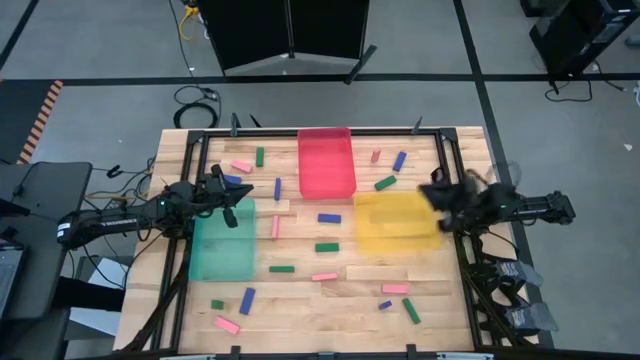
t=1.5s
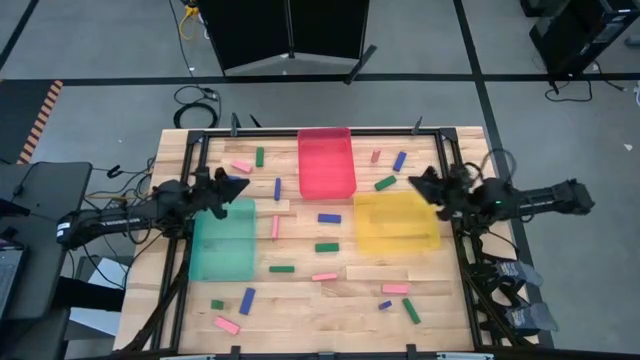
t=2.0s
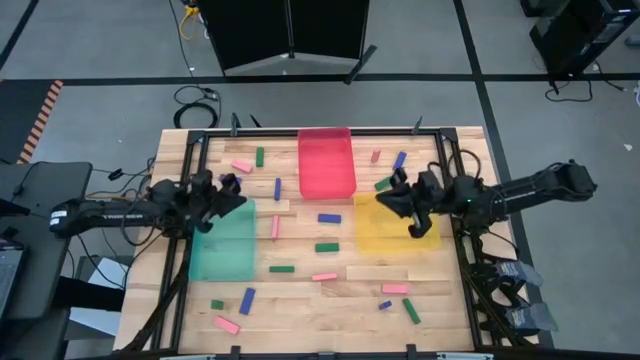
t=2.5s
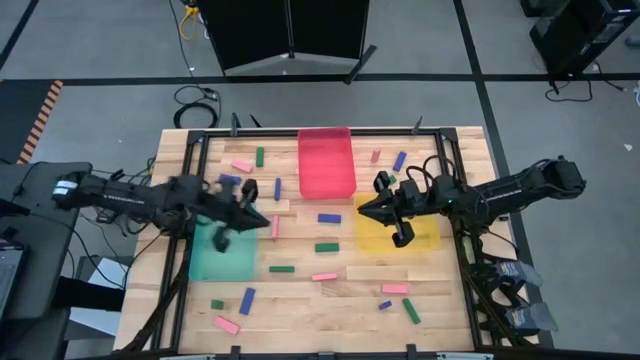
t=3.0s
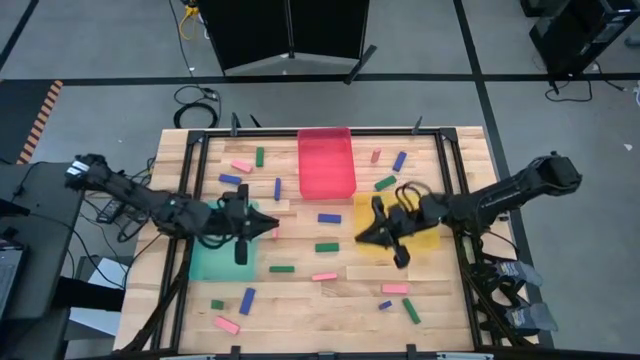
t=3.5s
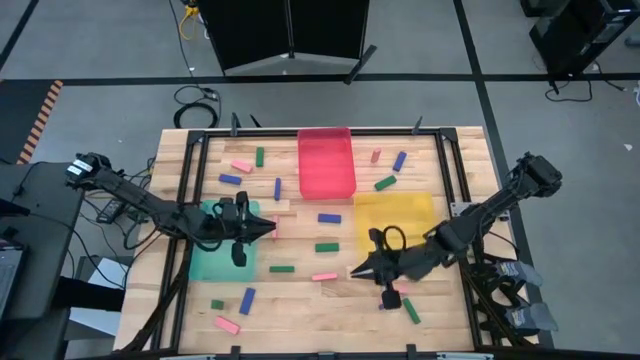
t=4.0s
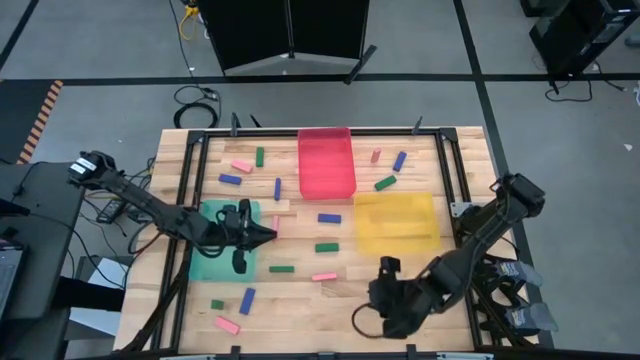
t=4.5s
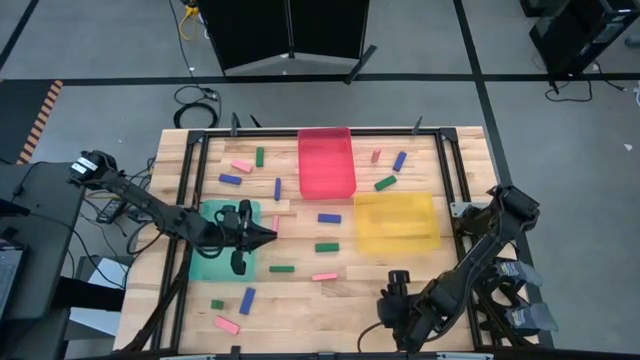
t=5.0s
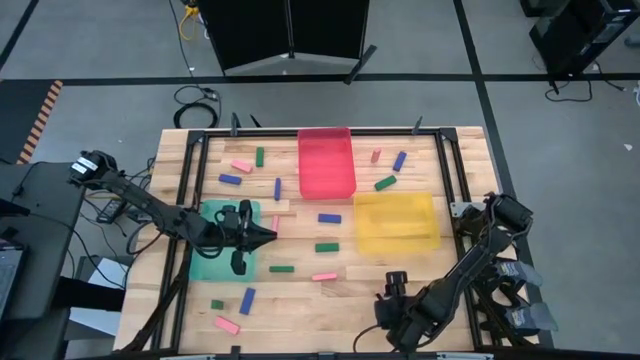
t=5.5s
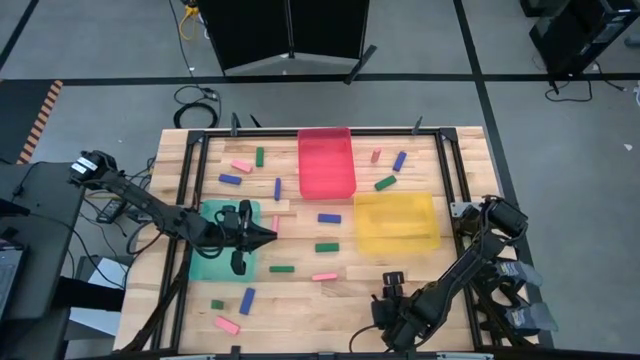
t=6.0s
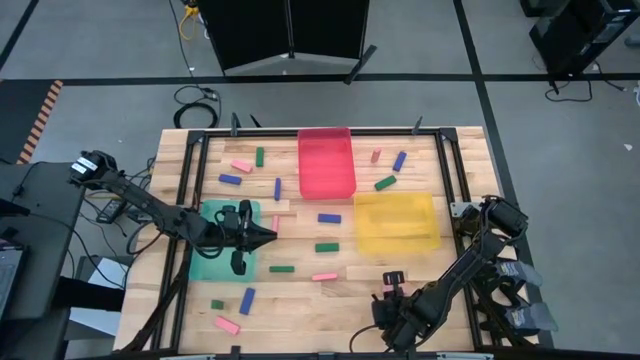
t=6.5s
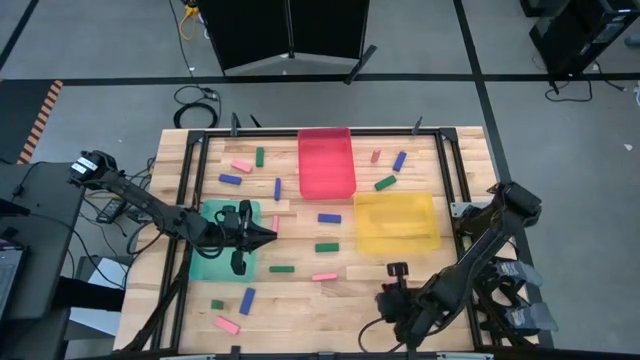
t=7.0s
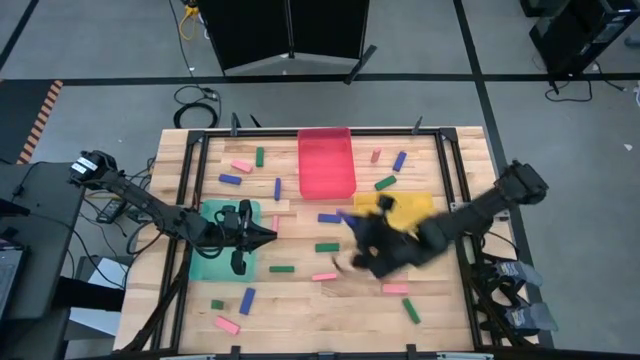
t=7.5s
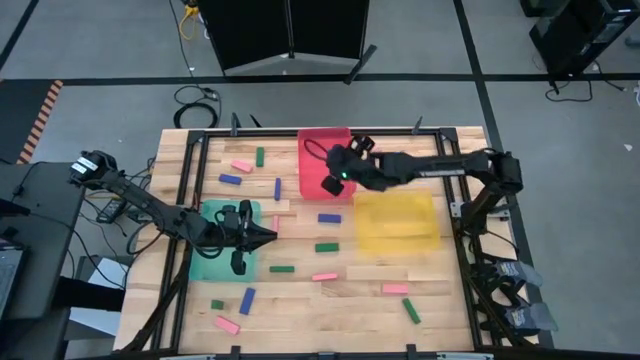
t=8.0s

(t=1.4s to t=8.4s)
Task: Sort blocks
Put the blue block into the red bin

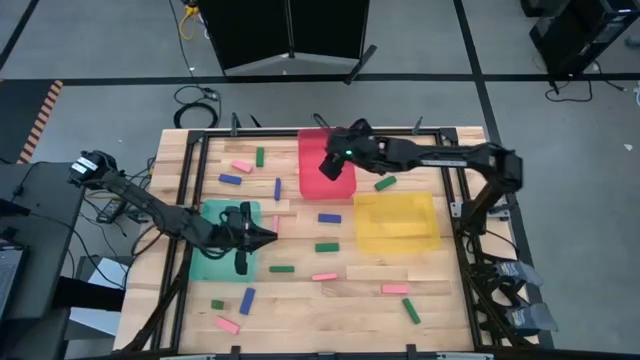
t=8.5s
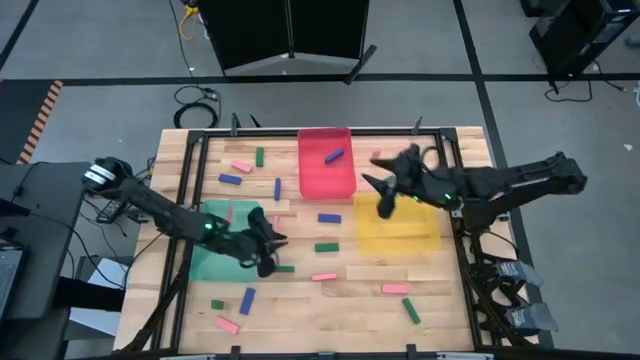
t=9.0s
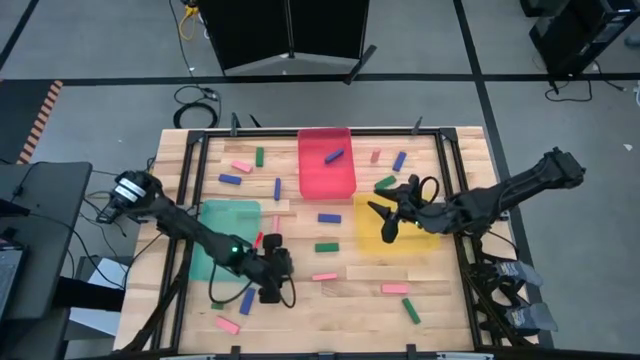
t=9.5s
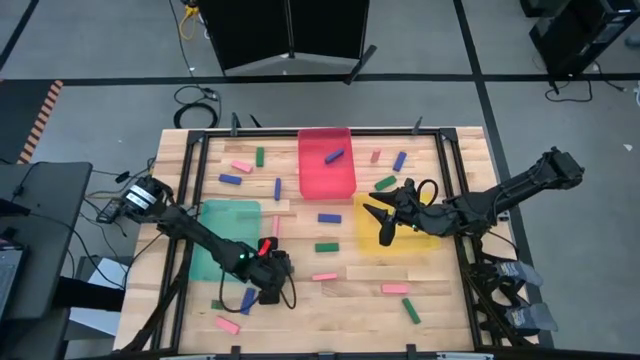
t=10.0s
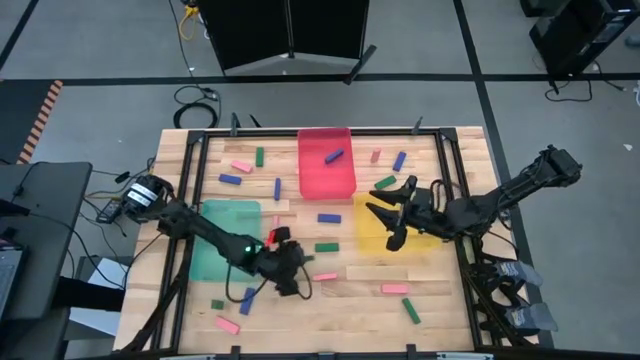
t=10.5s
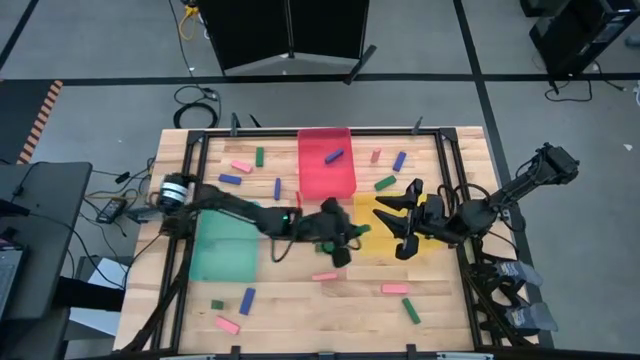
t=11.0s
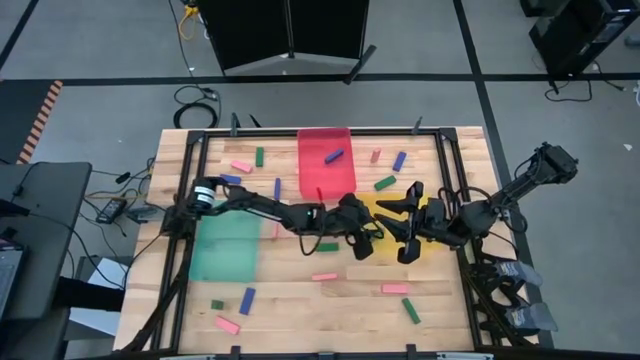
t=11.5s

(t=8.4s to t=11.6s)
Put the green block into the yellow bin

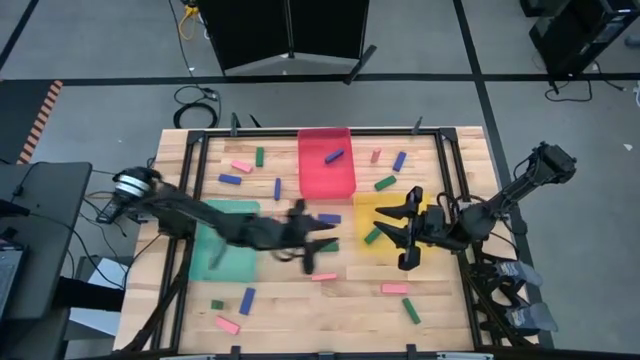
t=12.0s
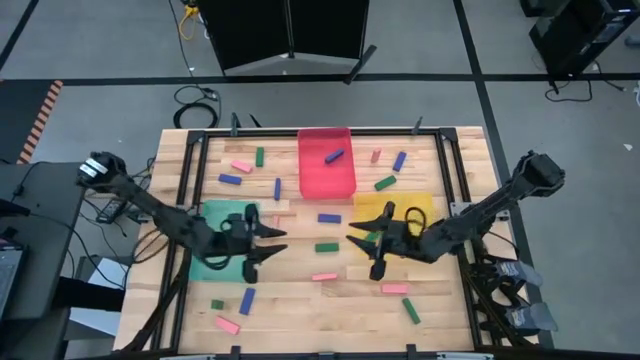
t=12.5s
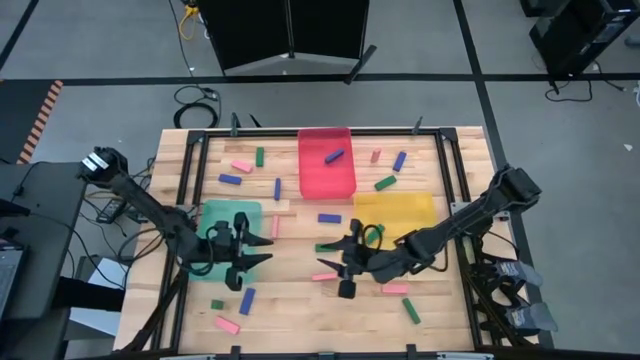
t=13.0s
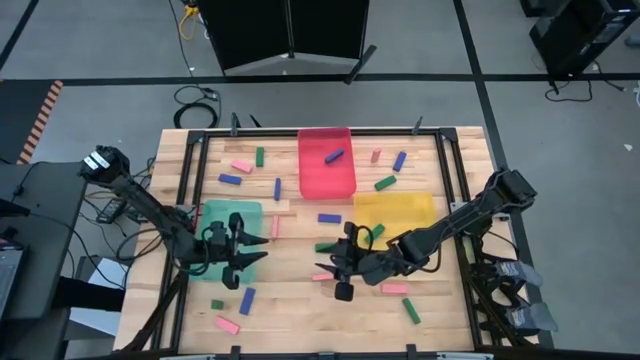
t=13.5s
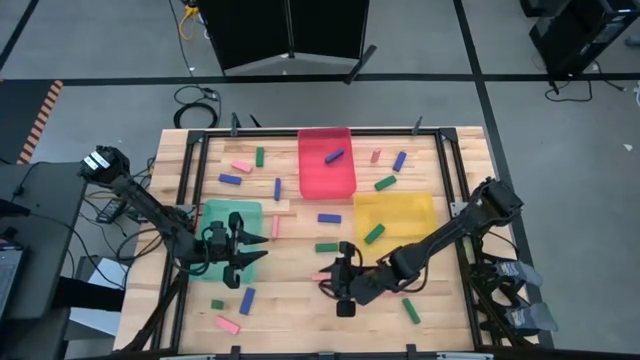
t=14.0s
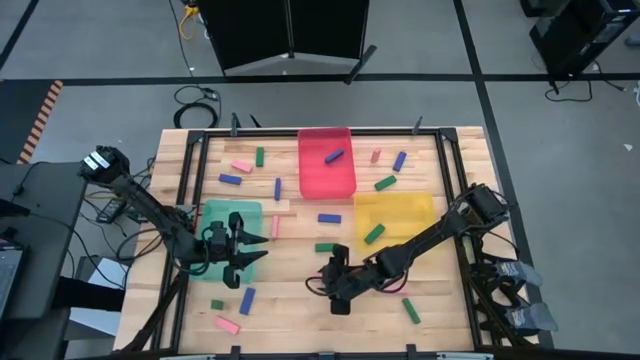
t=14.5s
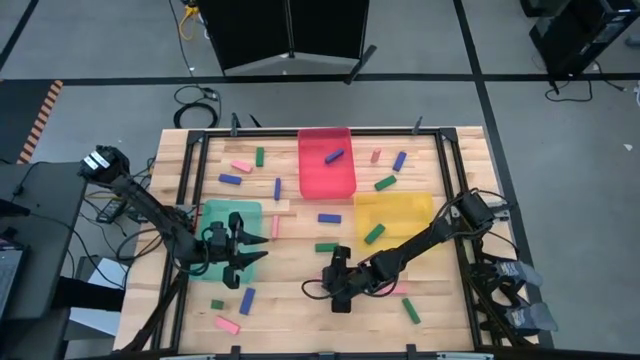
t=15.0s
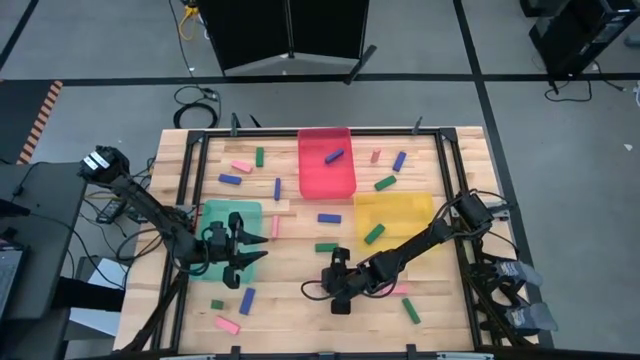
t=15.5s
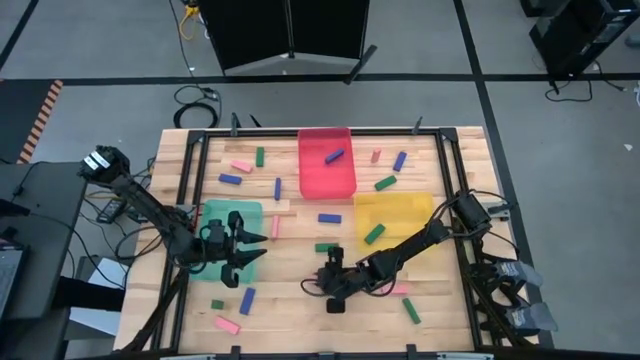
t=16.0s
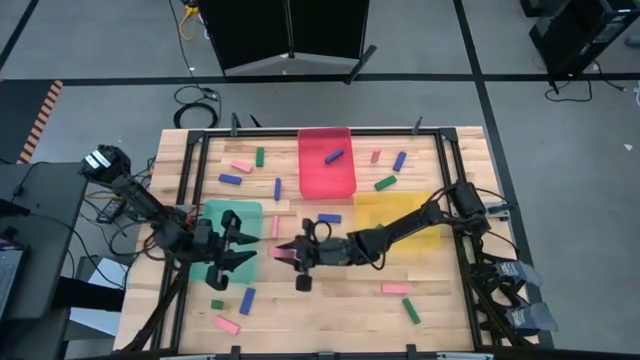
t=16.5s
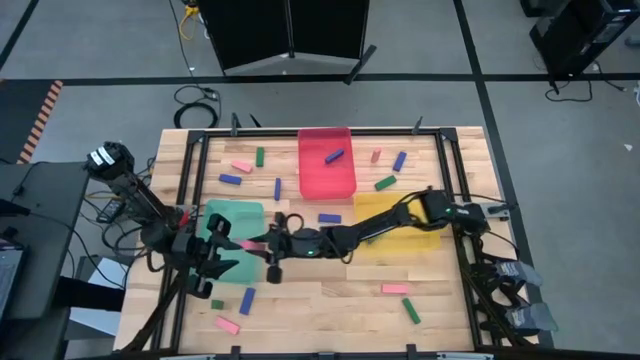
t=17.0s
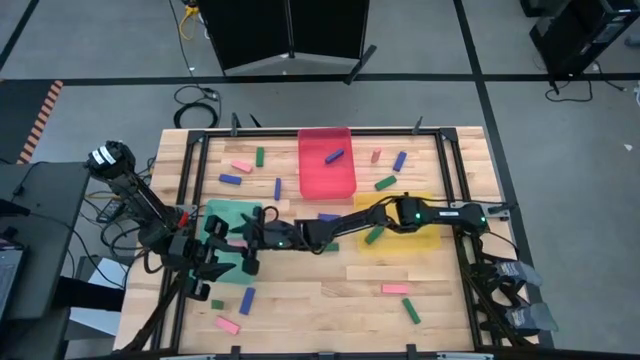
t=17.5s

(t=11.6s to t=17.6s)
Put the pink block into the green bin

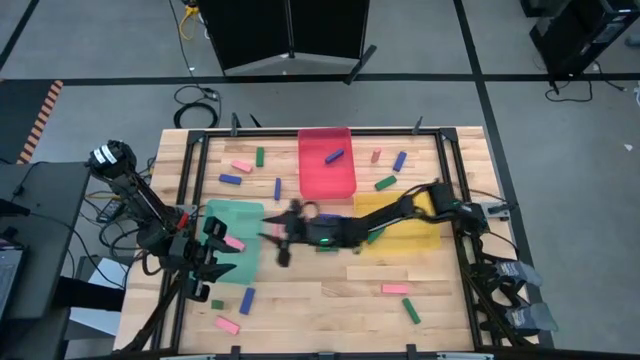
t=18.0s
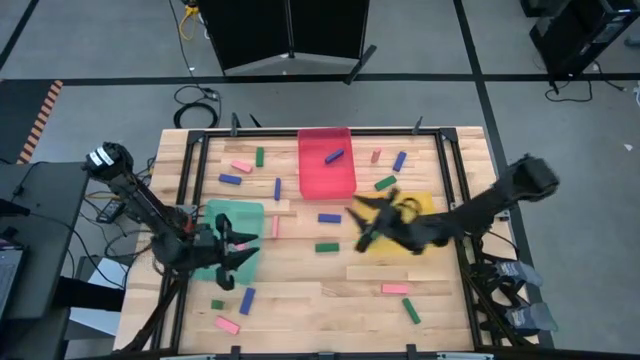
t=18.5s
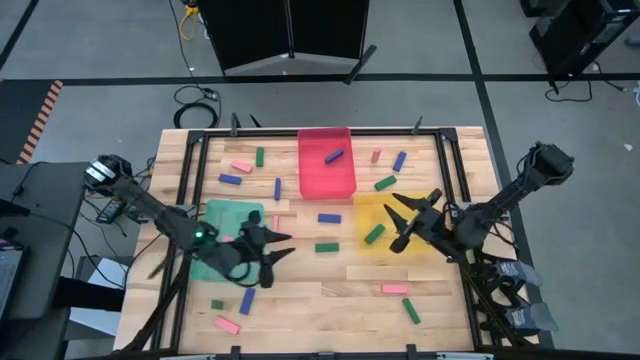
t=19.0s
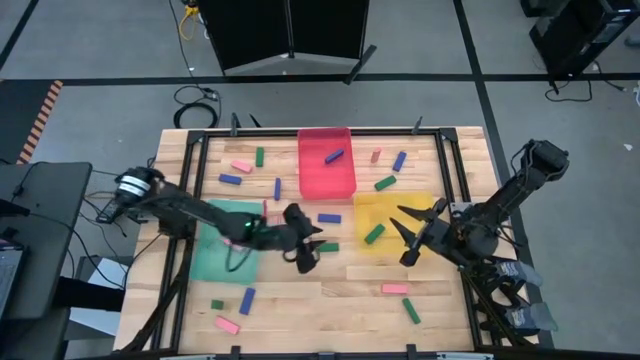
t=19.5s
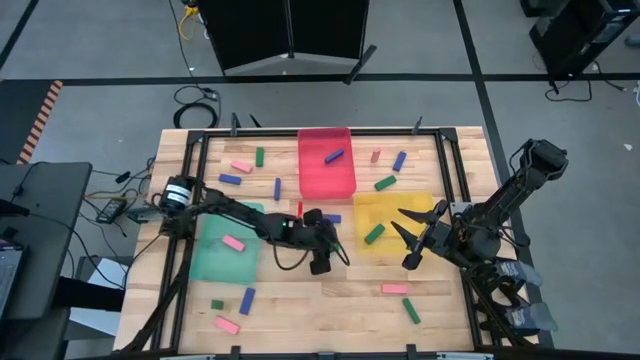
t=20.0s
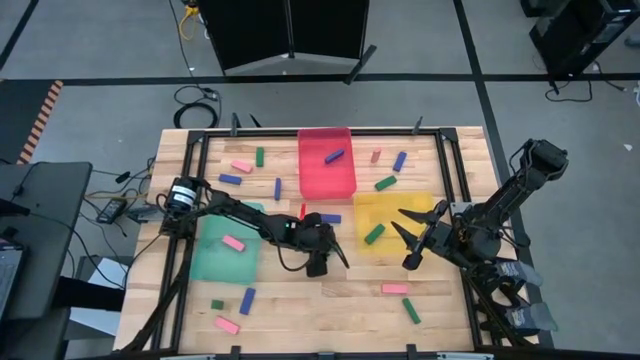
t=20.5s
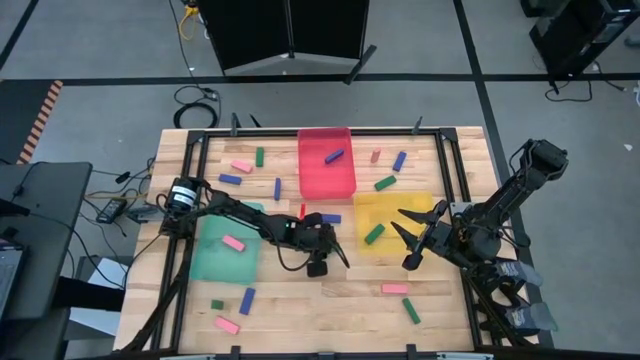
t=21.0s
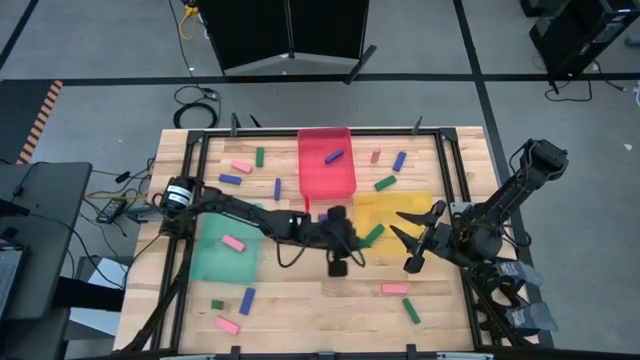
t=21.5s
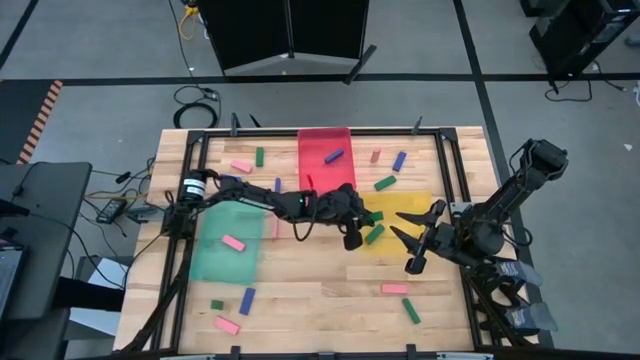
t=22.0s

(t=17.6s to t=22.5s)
Put the green block into the yellow bin
